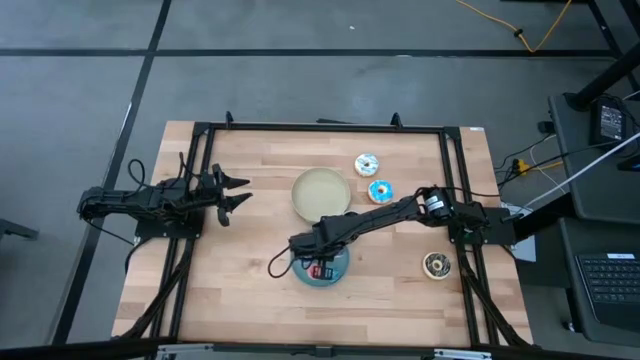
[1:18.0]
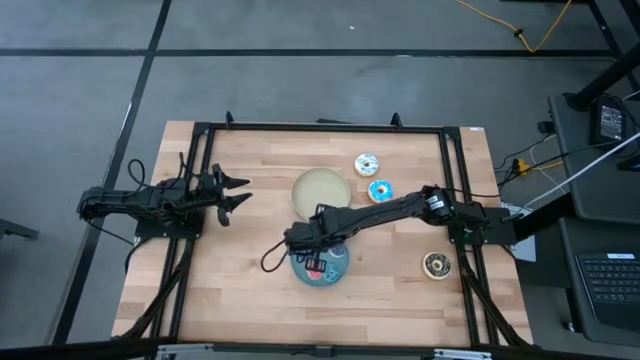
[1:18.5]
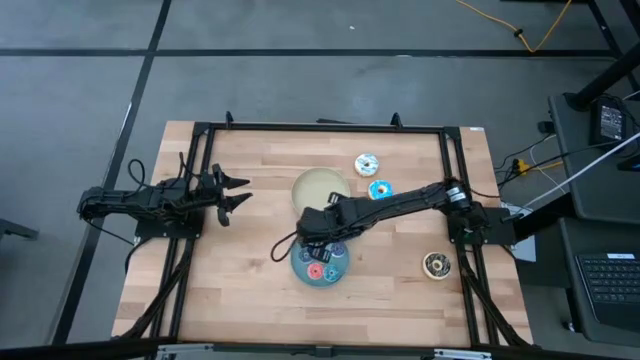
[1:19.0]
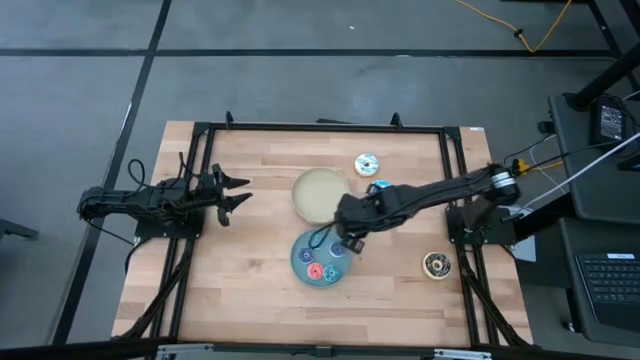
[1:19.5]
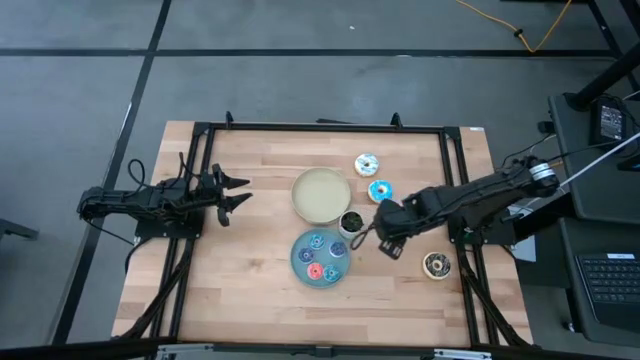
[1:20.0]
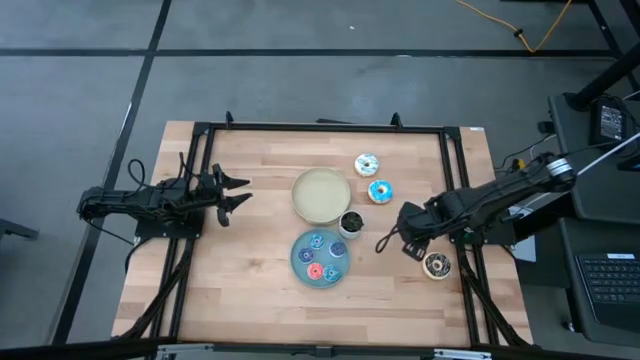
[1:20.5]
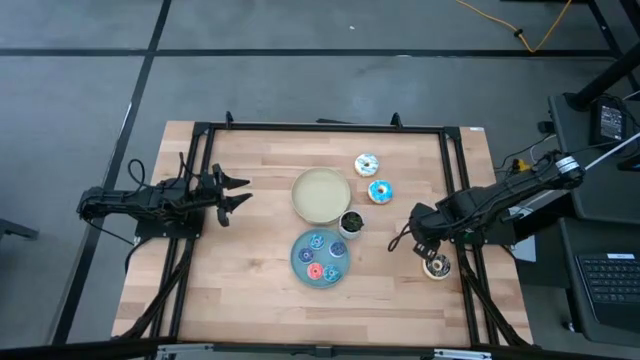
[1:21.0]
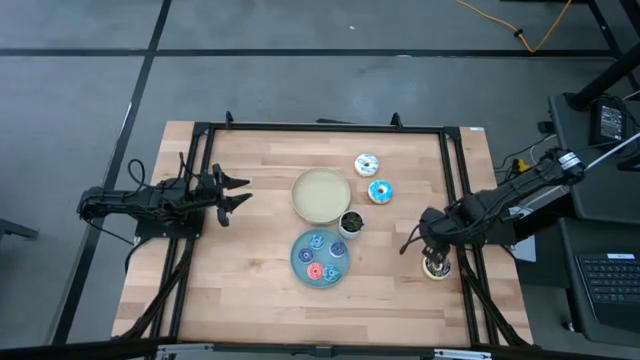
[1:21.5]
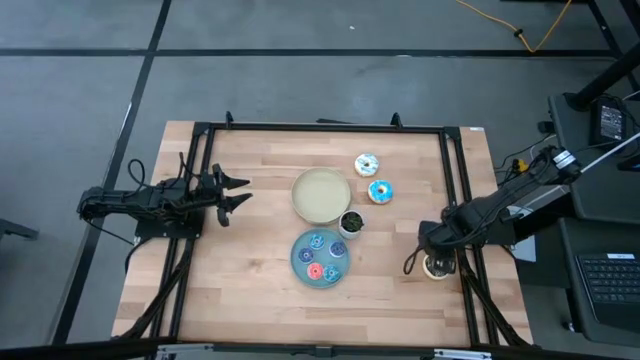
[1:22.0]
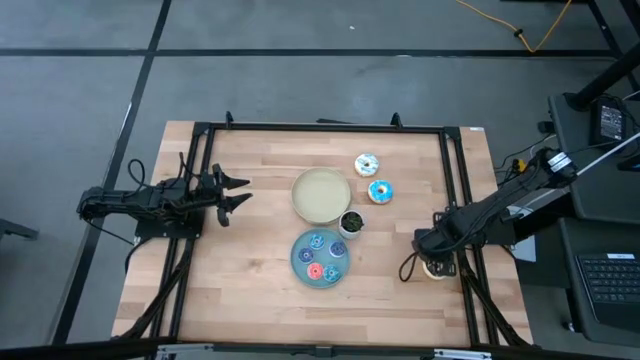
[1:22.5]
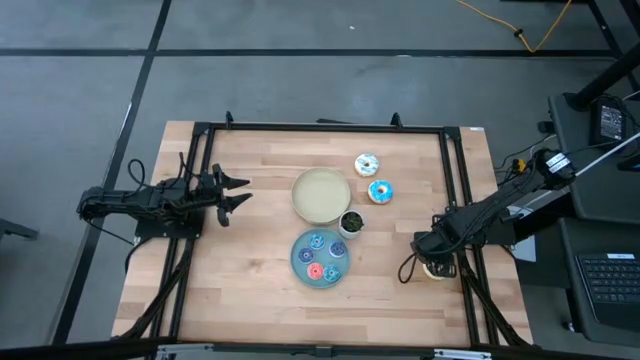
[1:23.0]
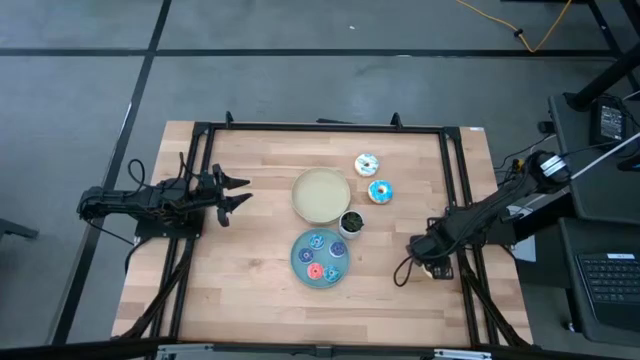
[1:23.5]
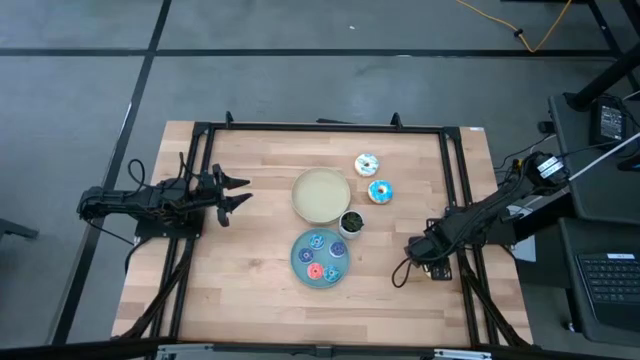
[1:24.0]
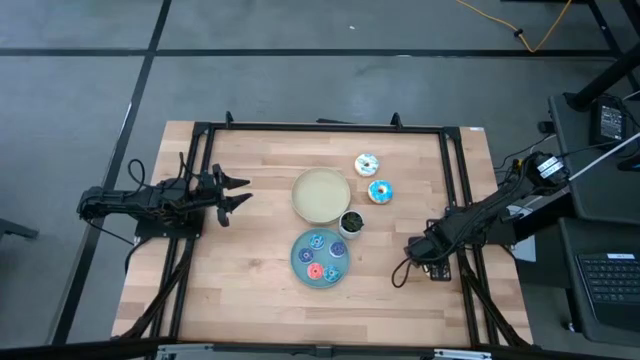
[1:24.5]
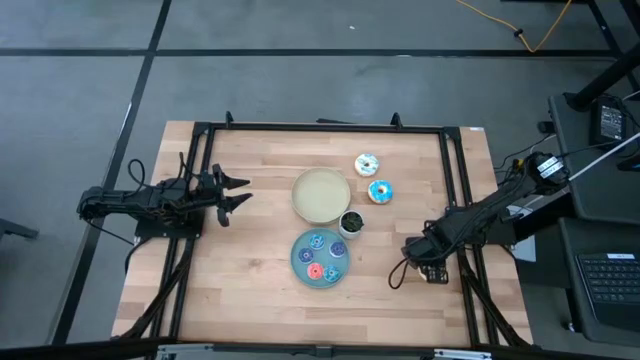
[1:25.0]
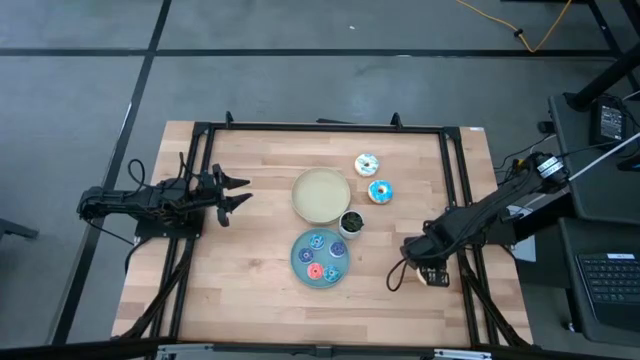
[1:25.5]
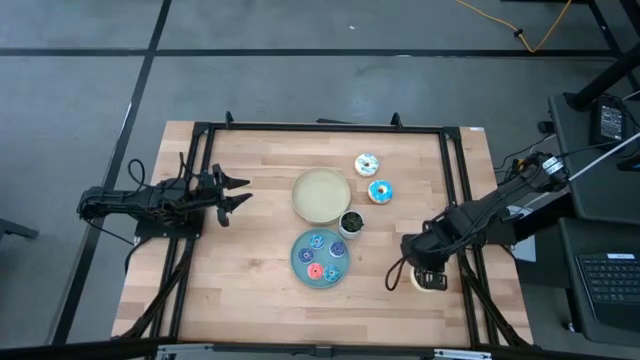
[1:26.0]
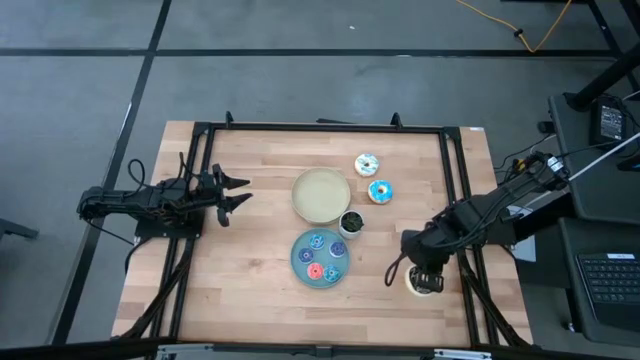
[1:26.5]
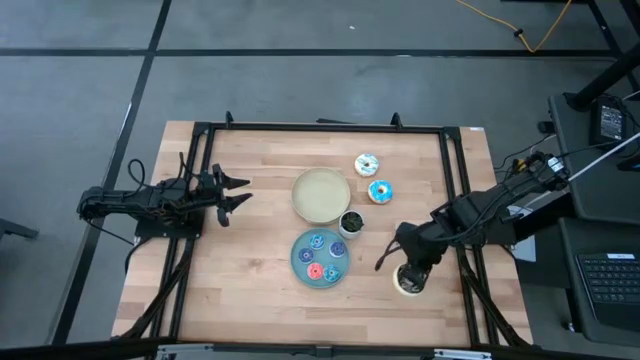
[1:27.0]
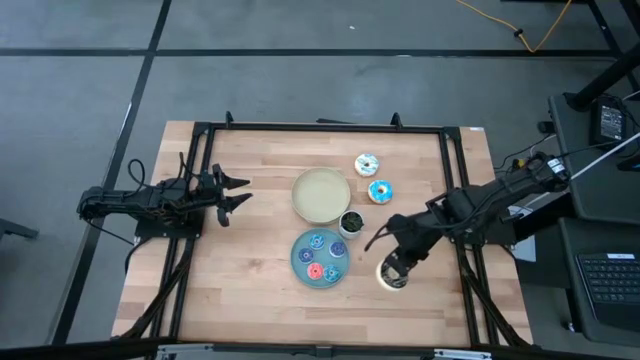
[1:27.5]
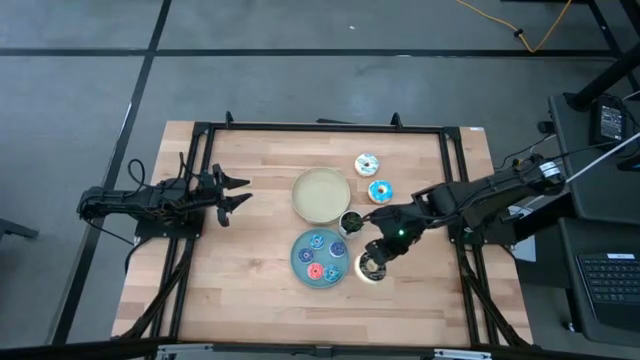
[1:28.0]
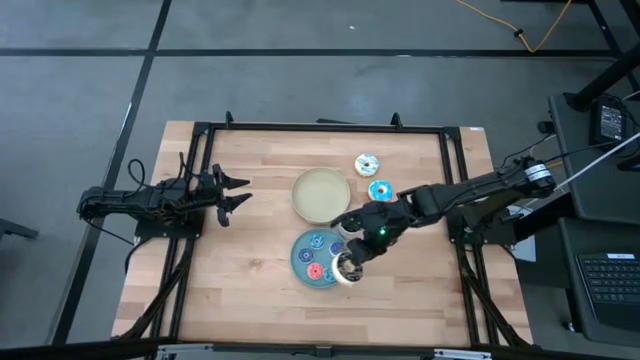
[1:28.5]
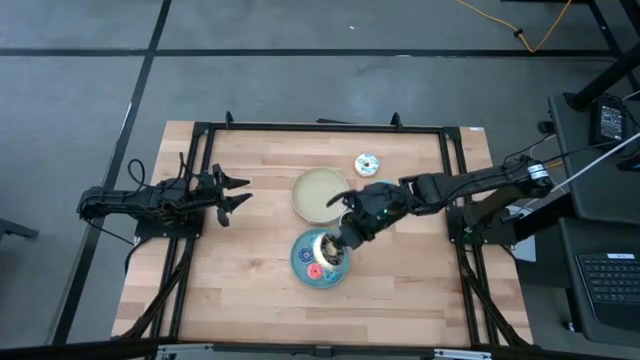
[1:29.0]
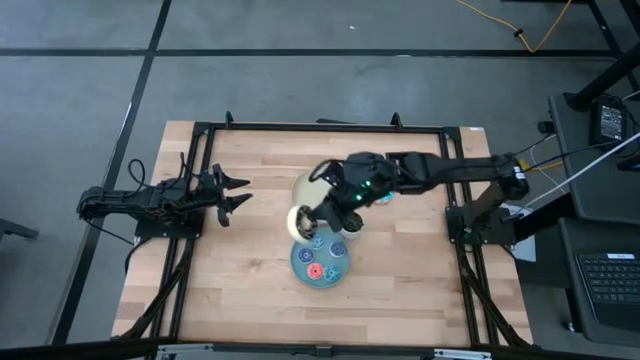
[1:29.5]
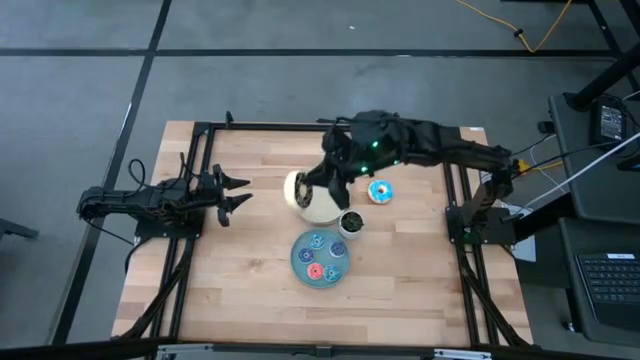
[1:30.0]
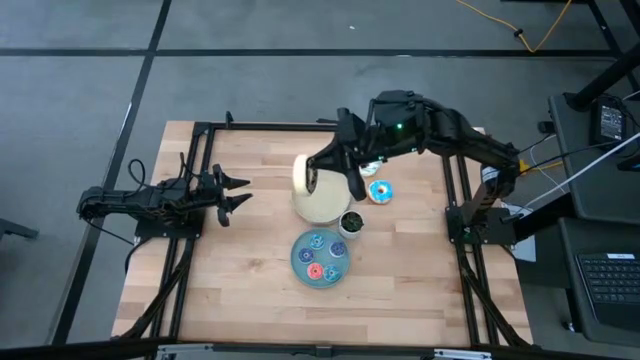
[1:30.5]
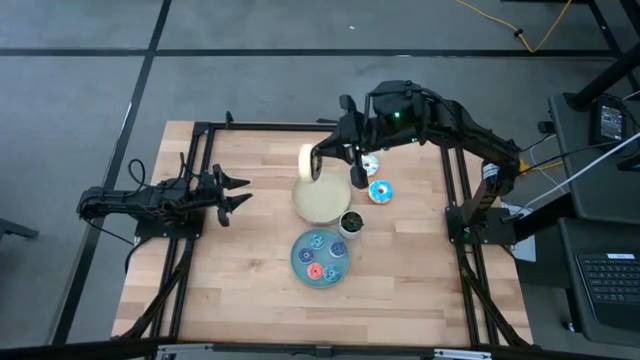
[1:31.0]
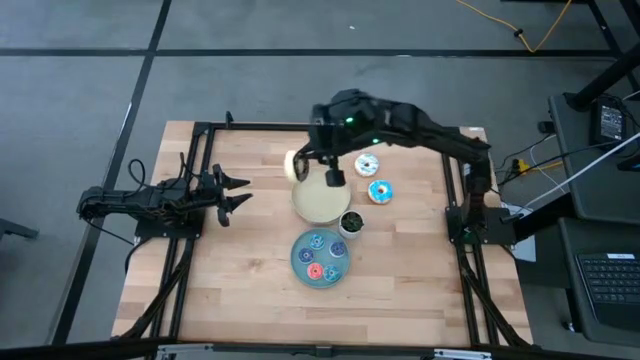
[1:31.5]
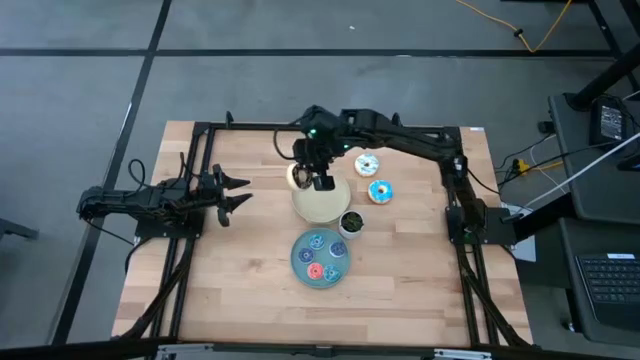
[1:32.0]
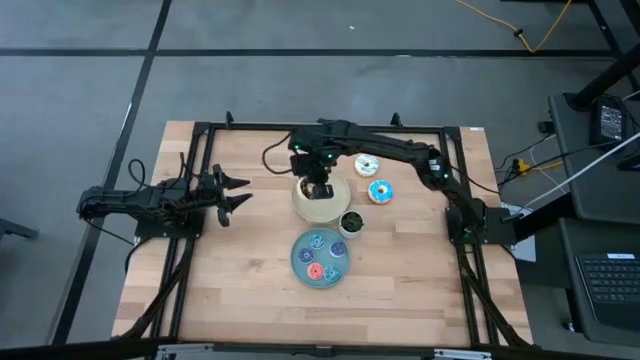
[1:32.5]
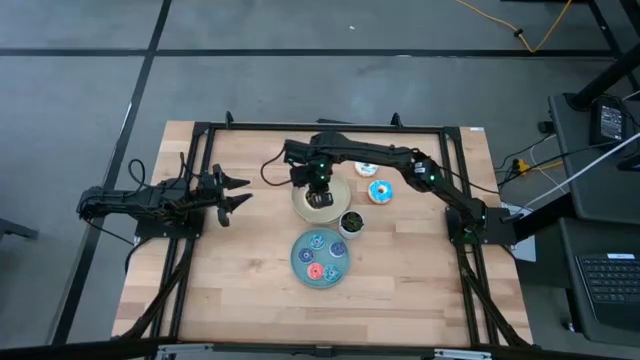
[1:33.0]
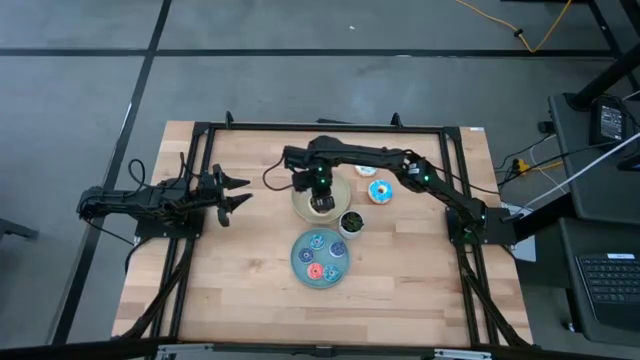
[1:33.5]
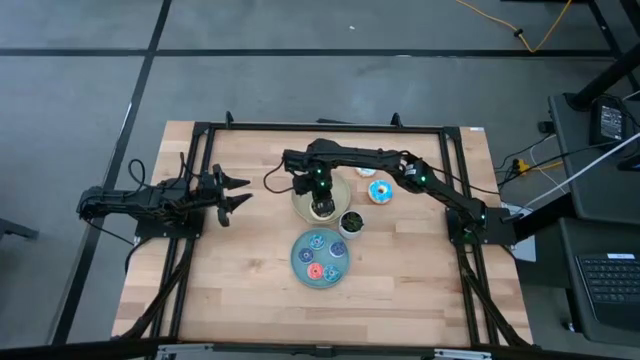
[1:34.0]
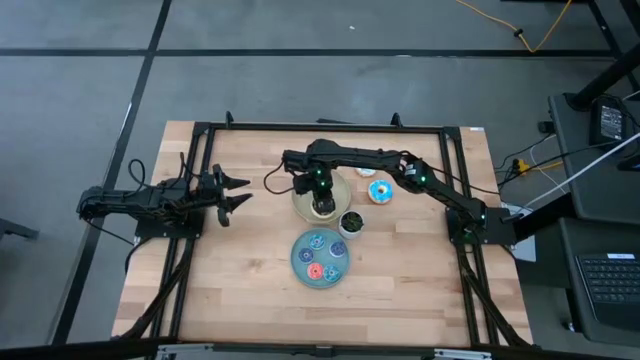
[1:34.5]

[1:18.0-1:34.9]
Task: Pick & Place donuts
Put the large black donut on the gray plate

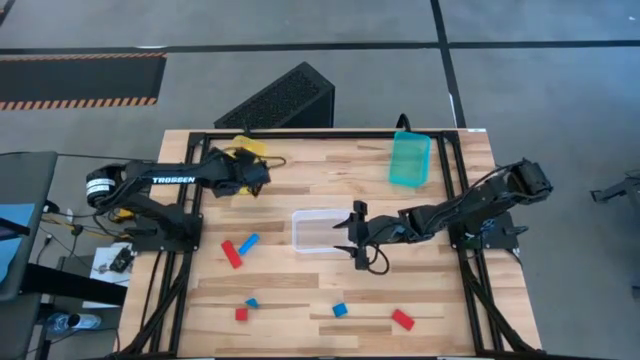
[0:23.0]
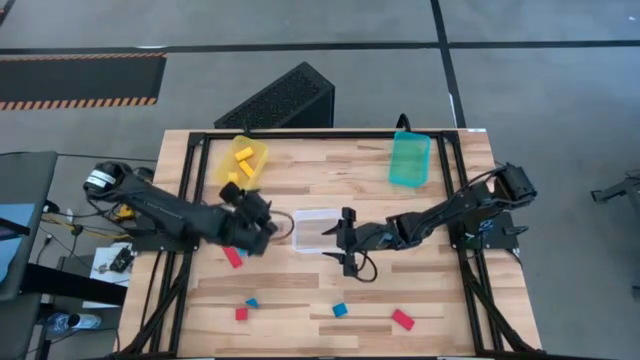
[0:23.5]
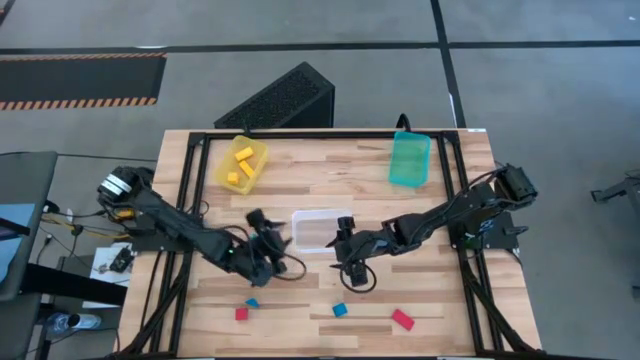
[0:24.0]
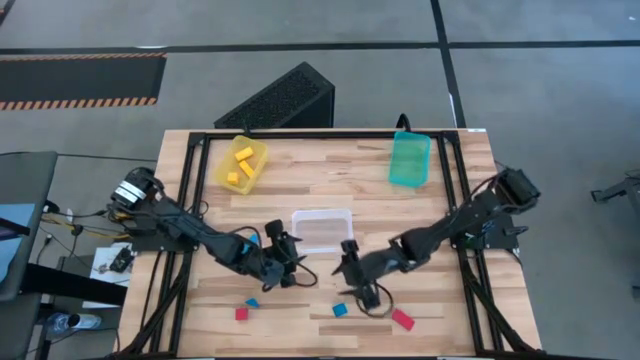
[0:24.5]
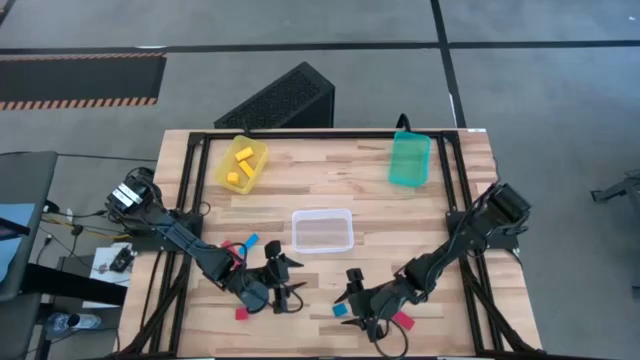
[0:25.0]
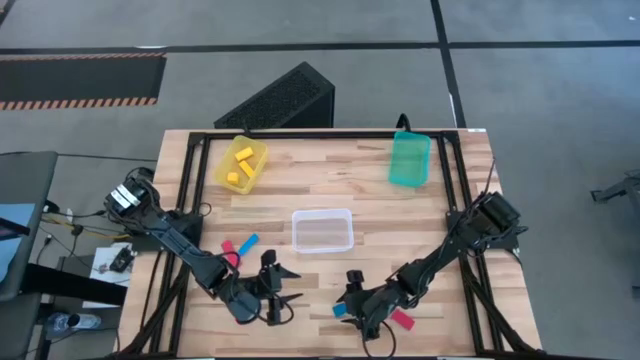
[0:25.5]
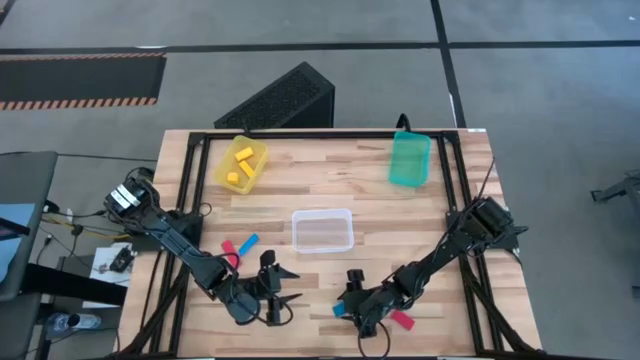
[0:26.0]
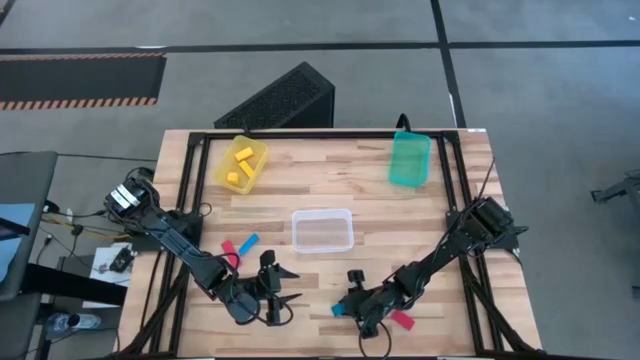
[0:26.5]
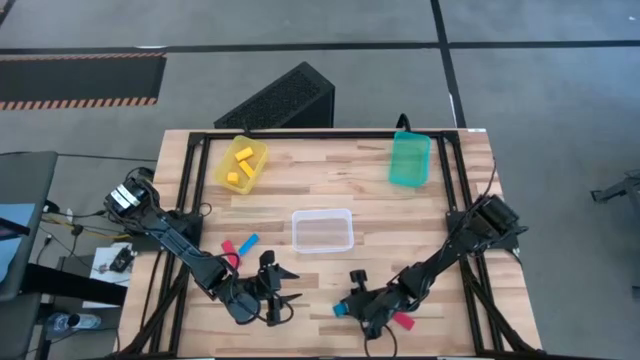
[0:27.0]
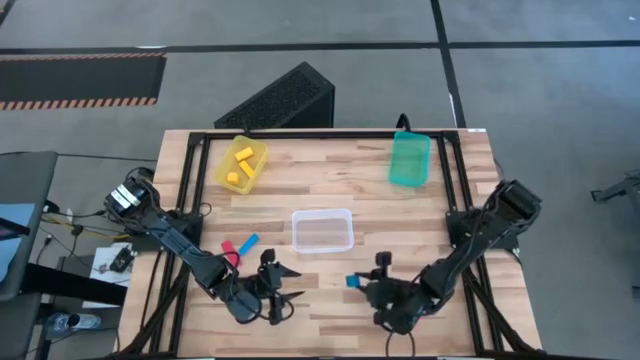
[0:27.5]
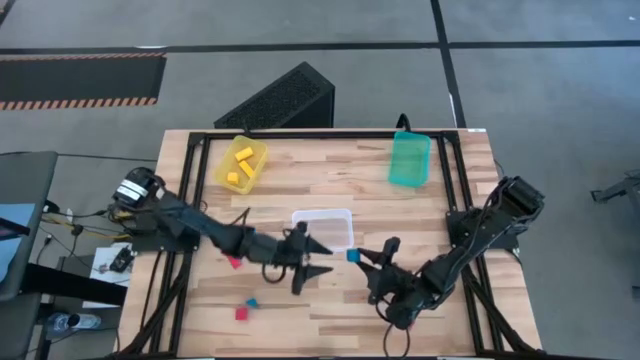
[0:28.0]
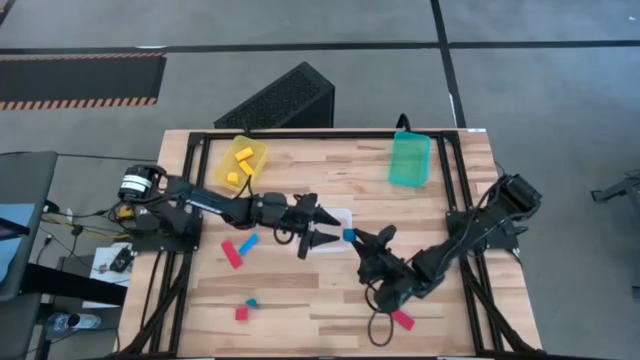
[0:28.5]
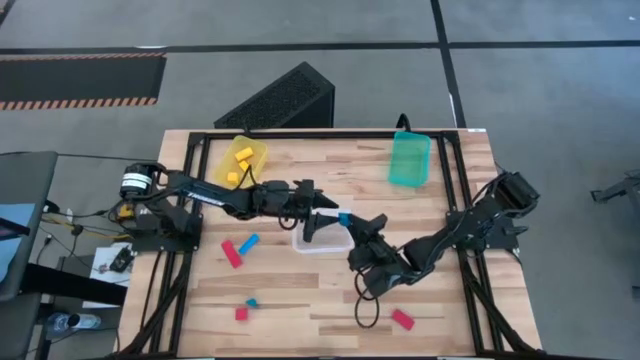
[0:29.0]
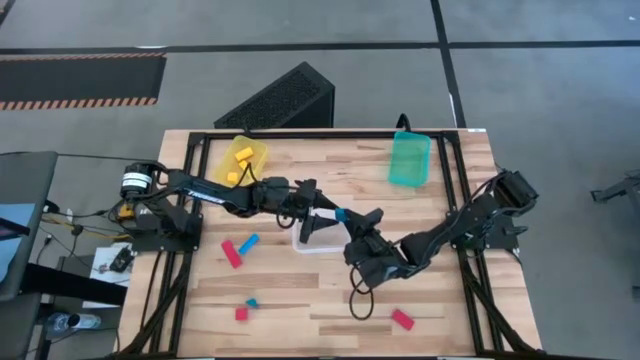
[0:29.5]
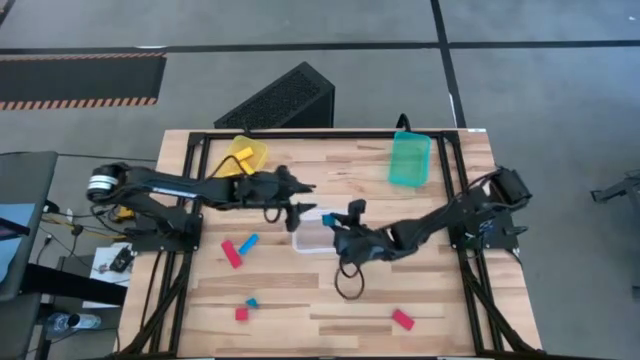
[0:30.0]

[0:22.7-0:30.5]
Task: Sort & place blocks by color
Put the bottom right blue block into the transparent bin
